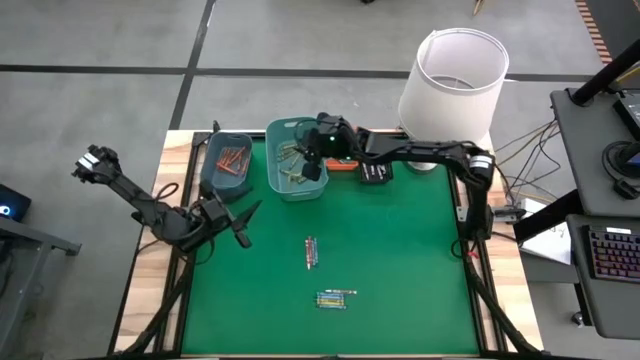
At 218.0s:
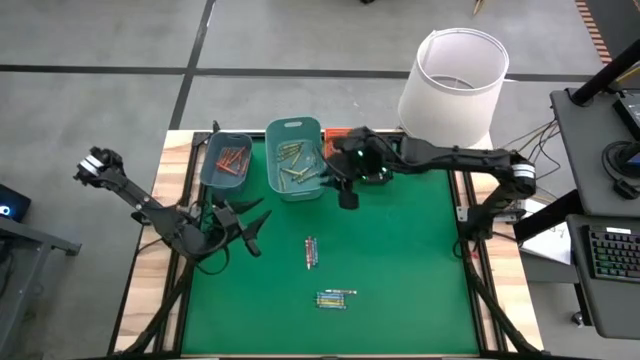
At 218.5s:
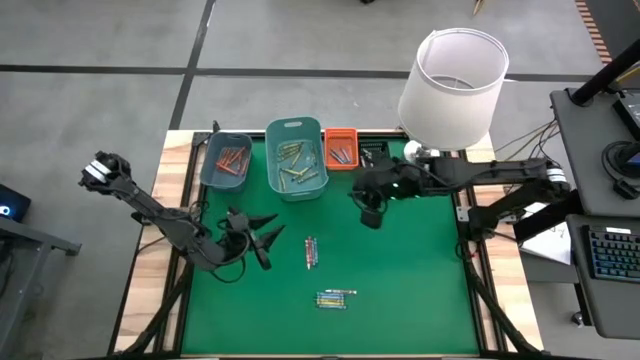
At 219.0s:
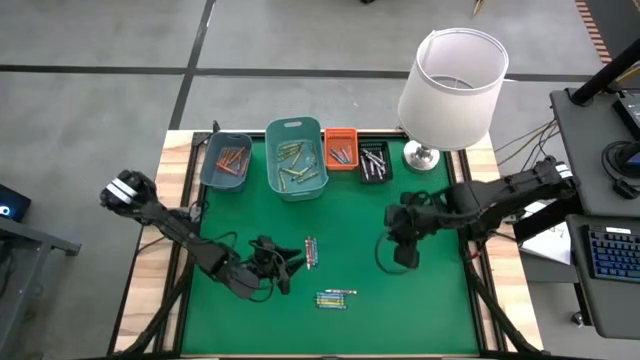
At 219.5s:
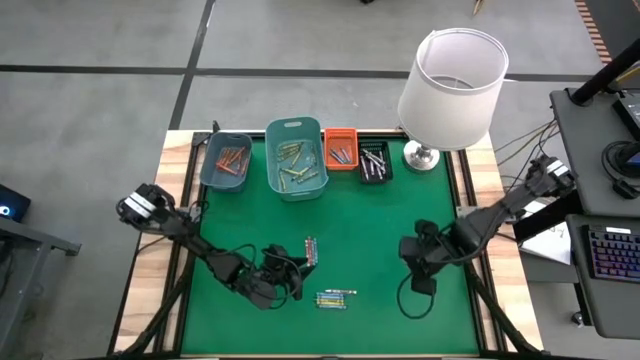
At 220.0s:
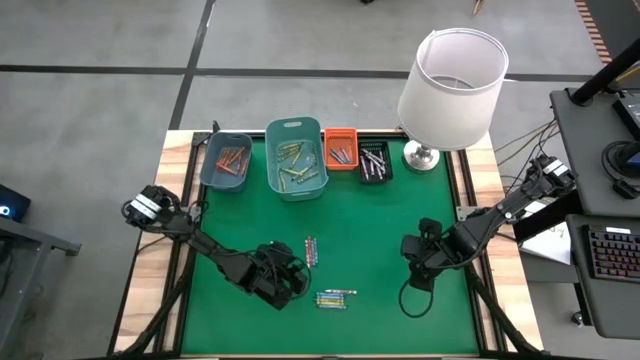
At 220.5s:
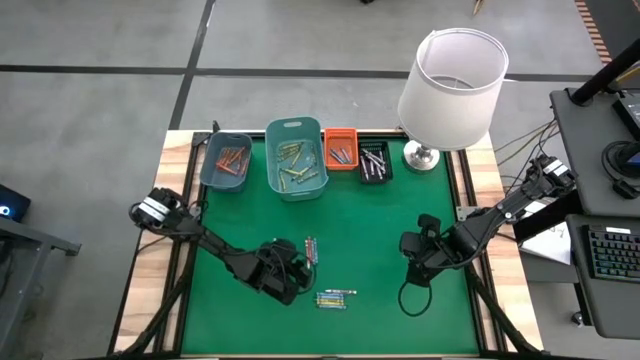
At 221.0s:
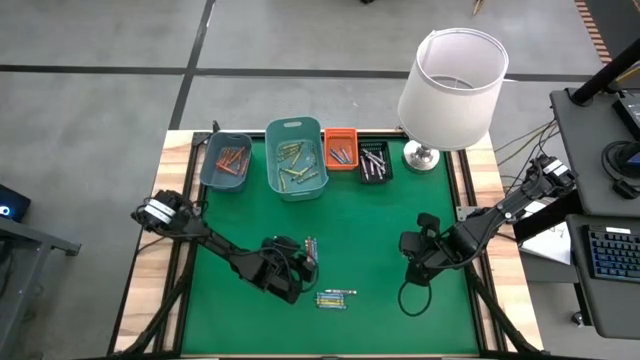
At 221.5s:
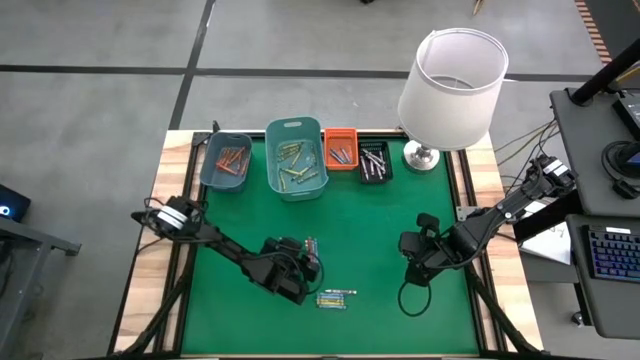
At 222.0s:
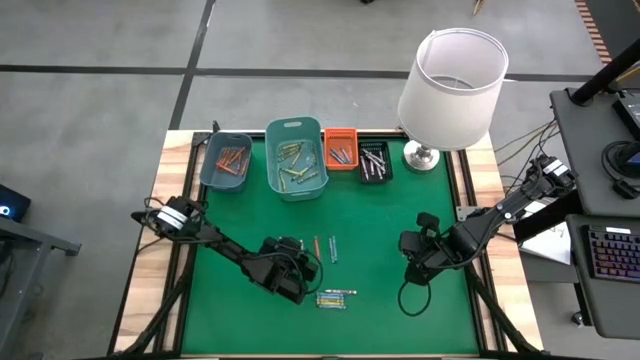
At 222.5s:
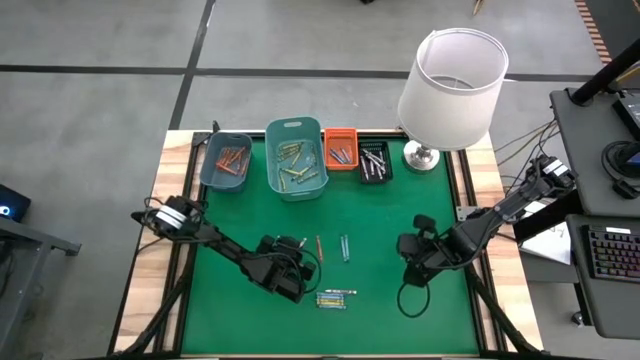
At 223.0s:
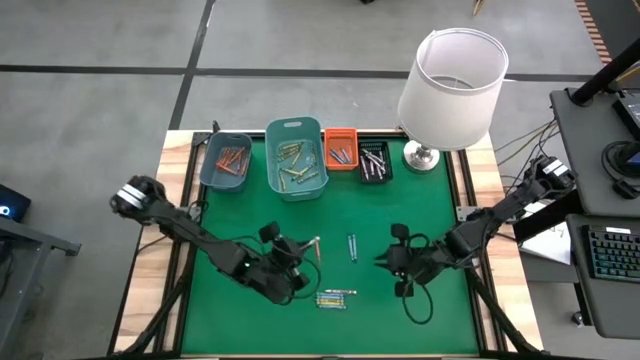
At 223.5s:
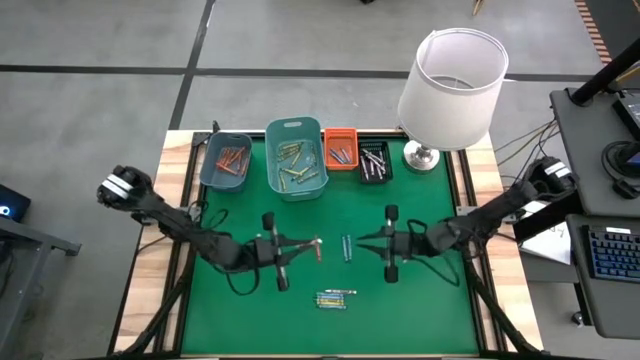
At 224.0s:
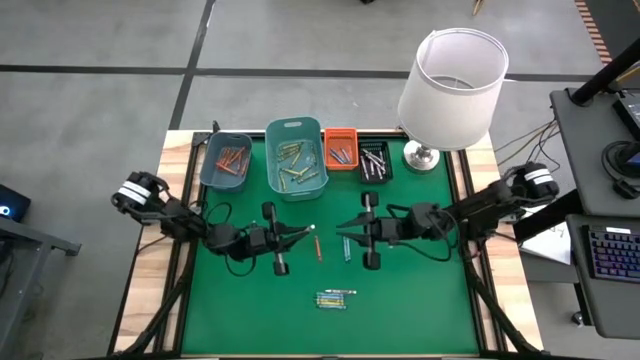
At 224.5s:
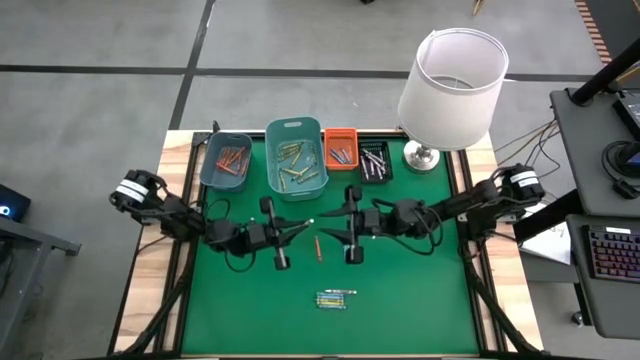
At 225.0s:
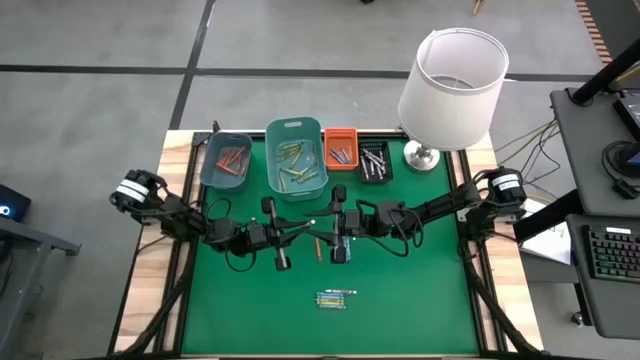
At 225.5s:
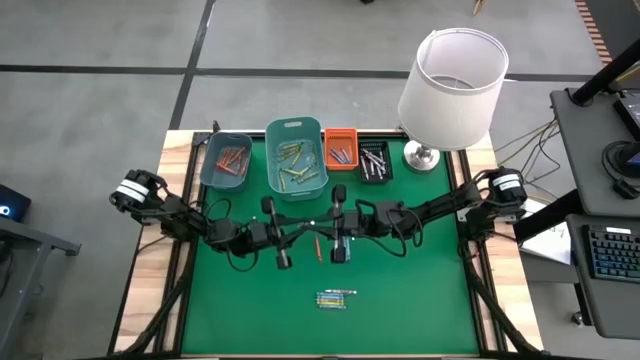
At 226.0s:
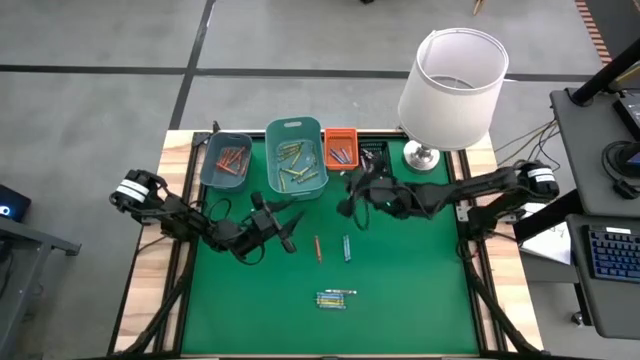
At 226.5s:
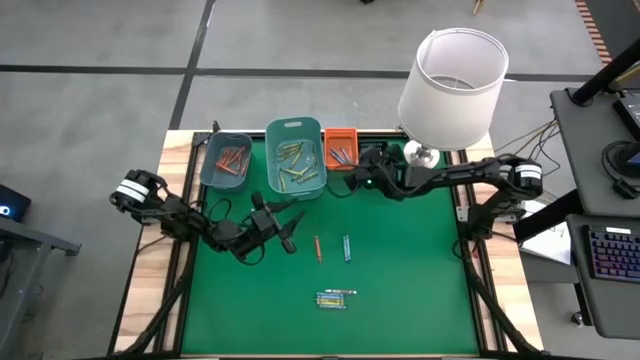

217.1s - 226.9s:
Task: Sort crayons
Put the white crayon into the black bin

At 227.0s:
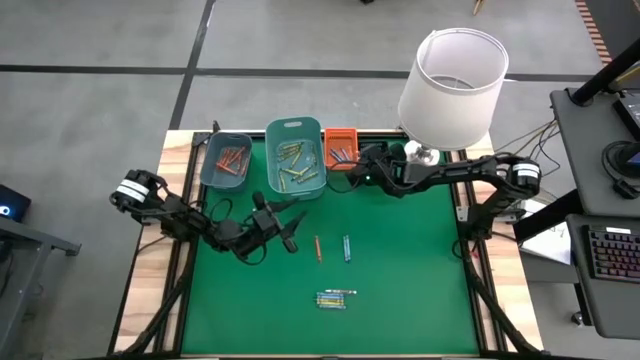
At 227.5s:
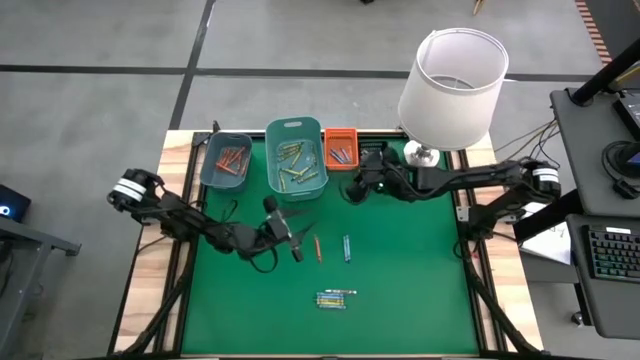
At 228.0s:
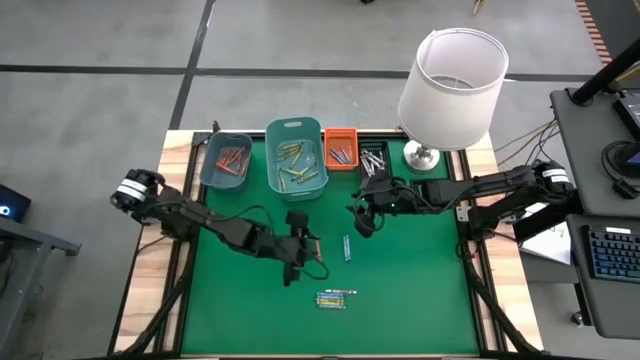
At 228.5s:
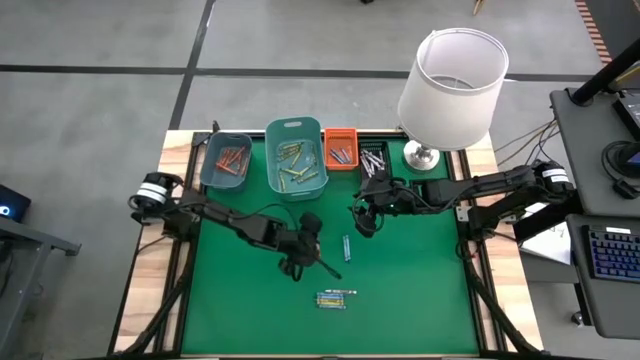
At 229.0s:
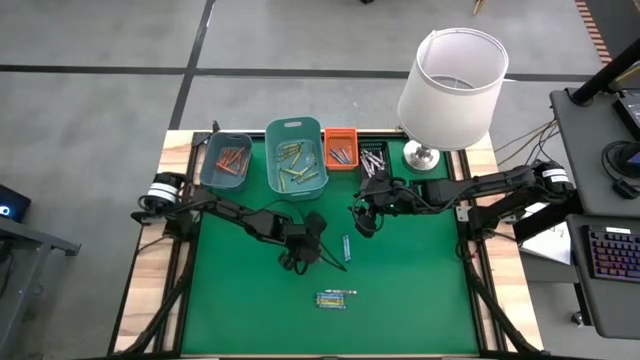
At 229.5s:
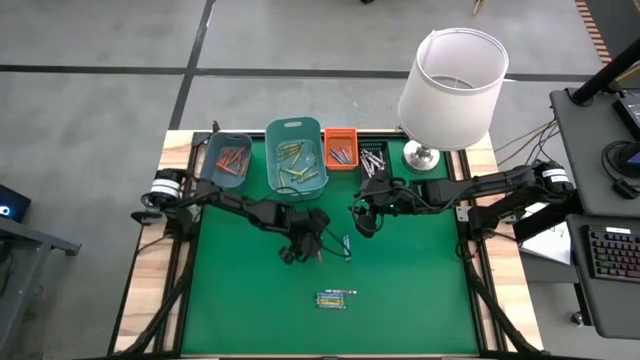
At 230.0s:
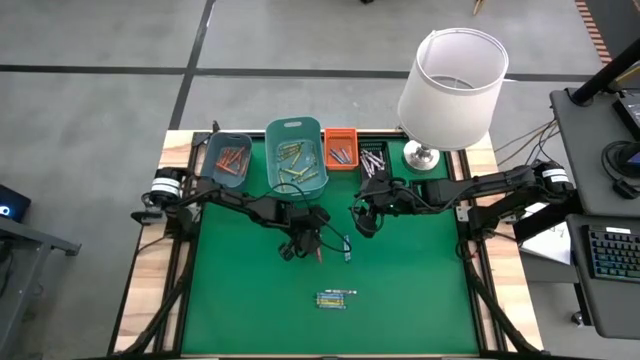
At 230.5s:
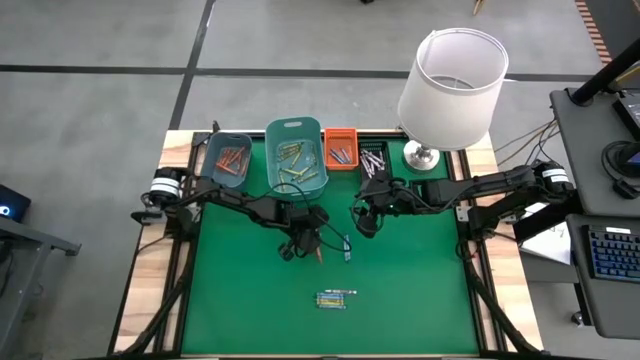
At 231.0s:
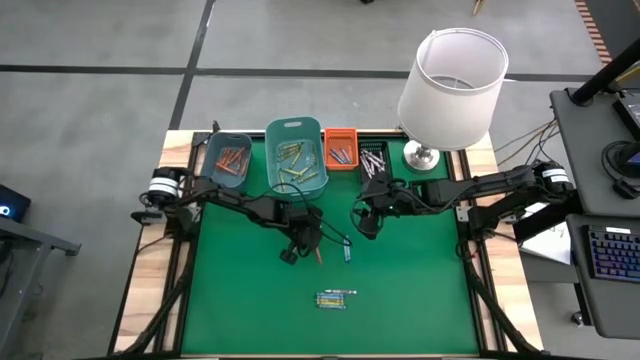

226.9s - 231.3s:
Put the orange crayon into the blue bin

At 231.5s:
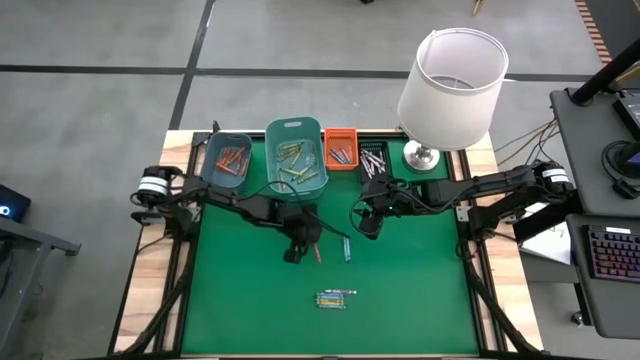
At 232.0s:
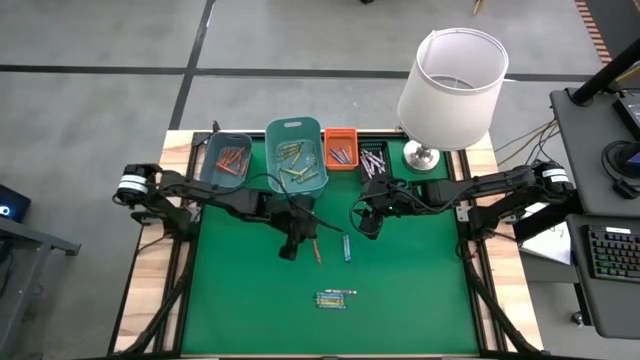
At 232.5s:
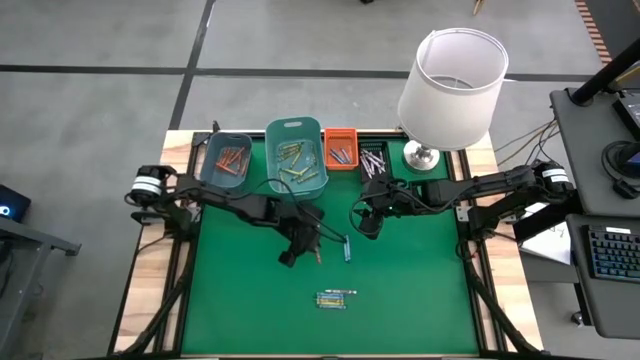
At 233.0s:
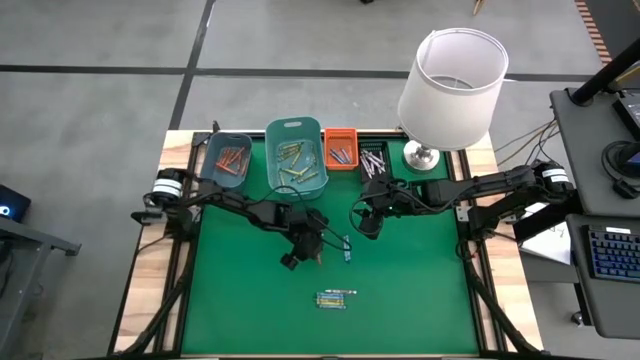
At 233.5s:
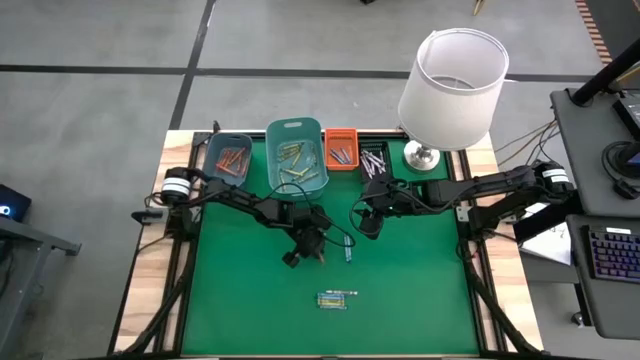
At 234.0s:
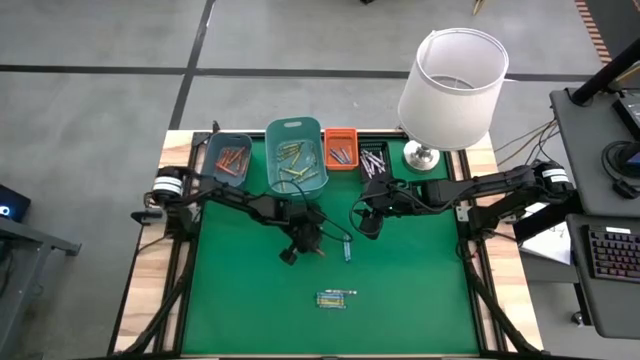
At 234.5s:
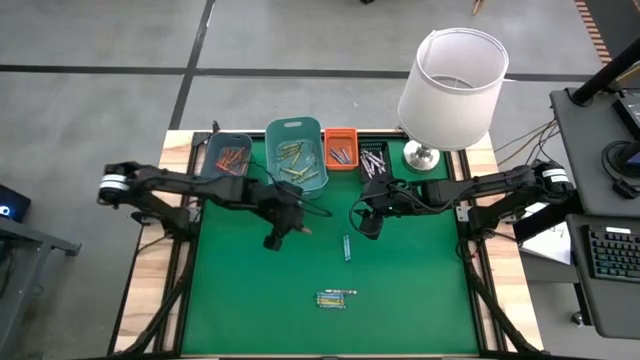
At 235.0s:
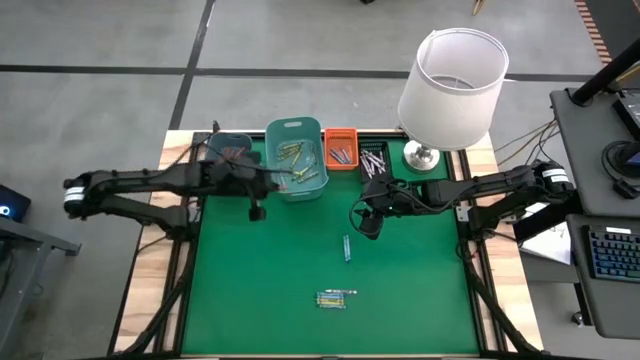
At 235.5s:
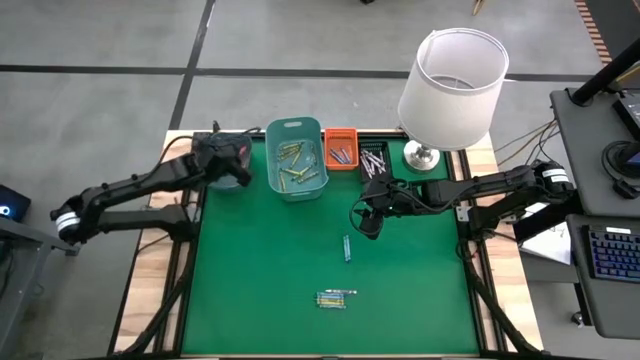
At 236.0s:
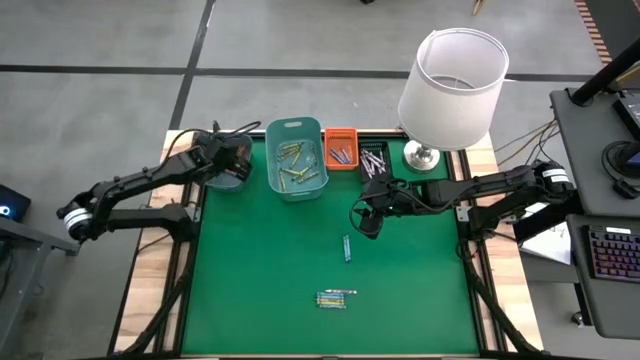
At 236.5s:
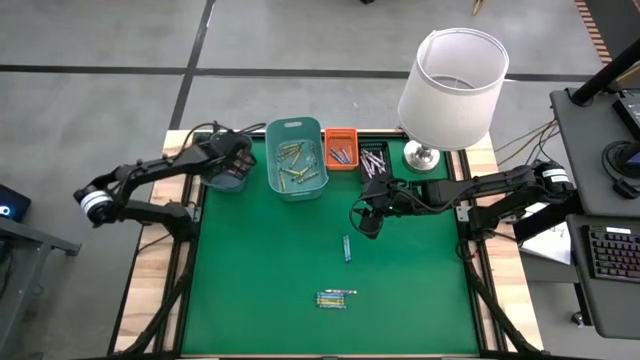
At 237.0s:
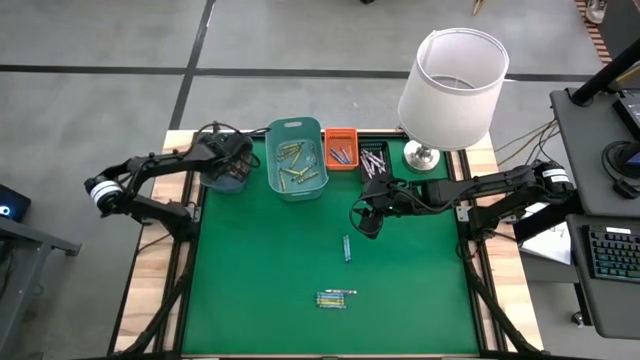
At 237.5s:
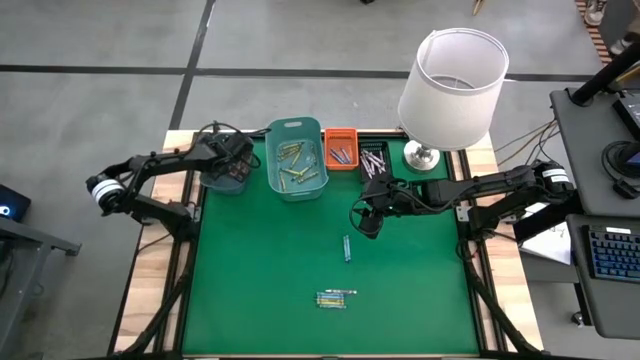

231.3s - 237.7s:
Put the orange crayon into the blue bin
